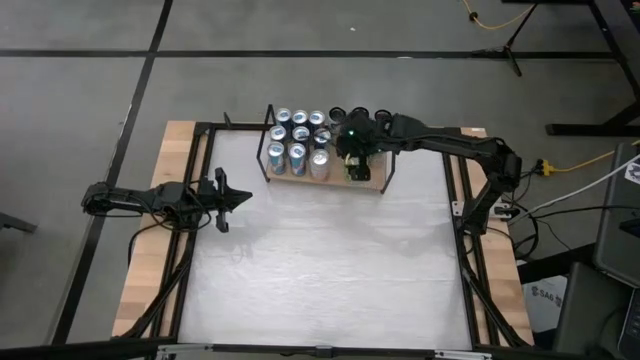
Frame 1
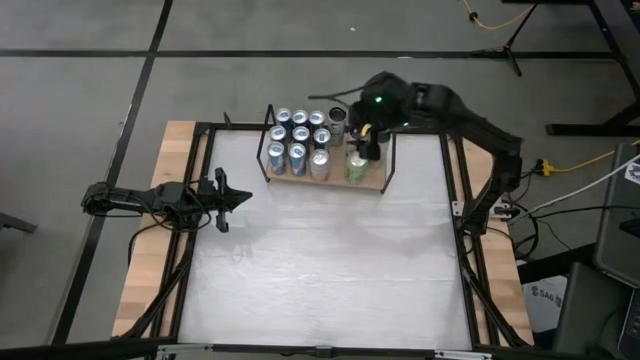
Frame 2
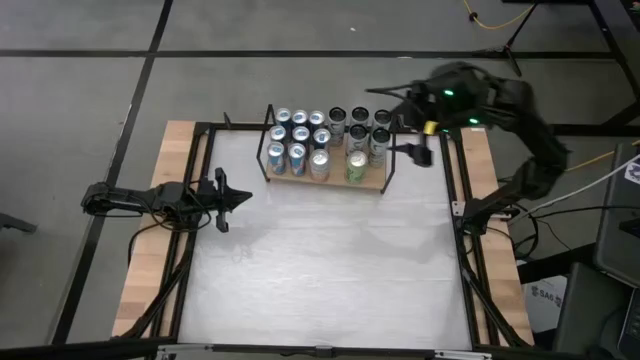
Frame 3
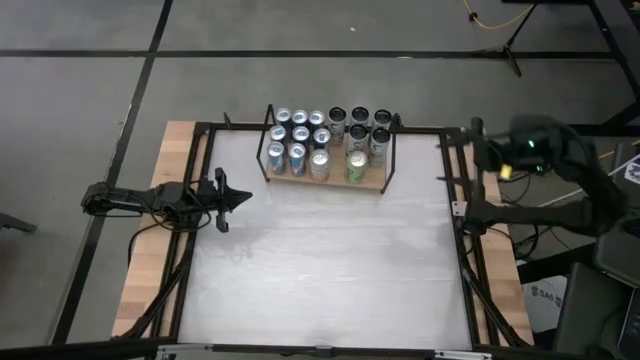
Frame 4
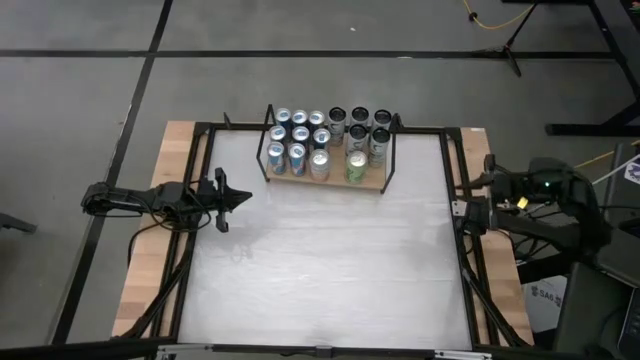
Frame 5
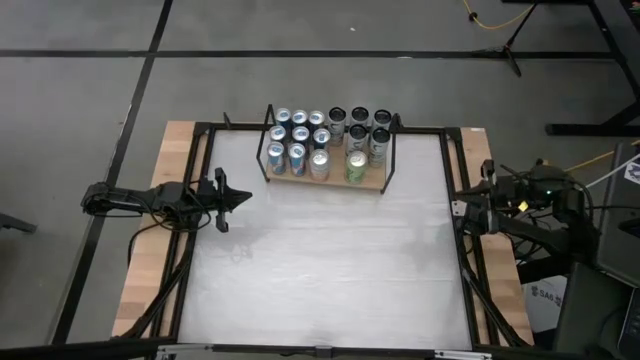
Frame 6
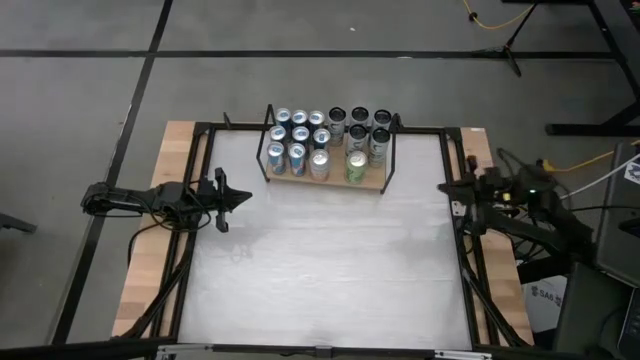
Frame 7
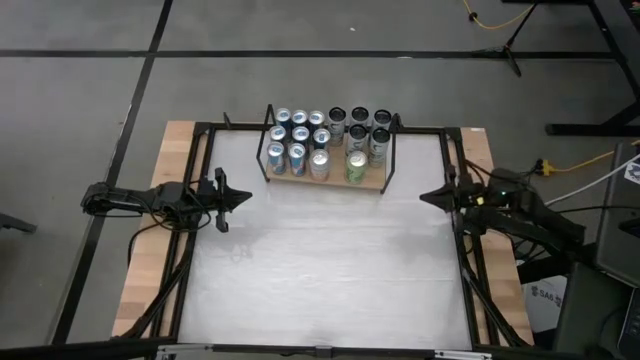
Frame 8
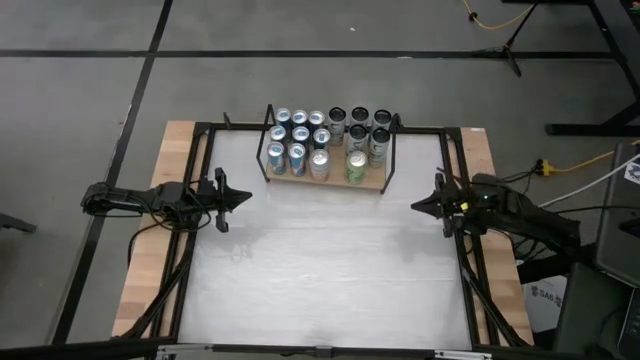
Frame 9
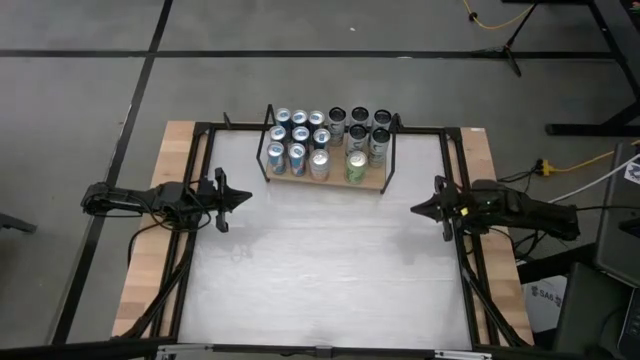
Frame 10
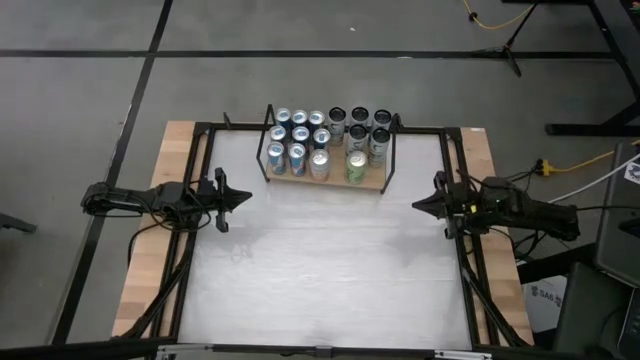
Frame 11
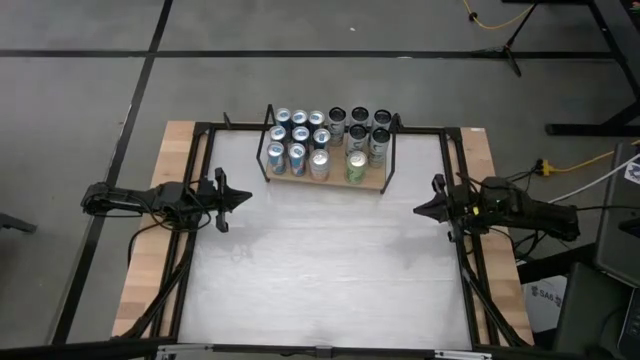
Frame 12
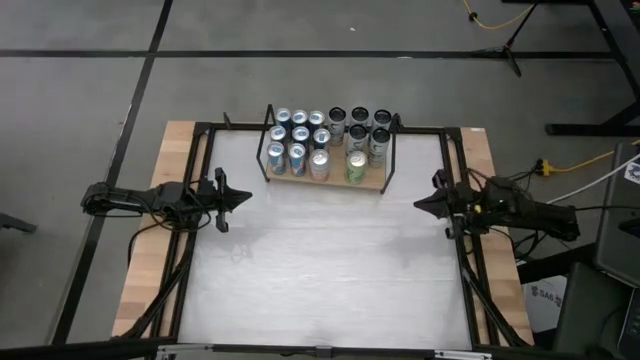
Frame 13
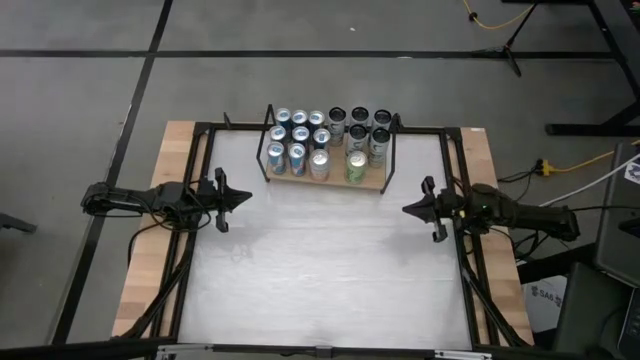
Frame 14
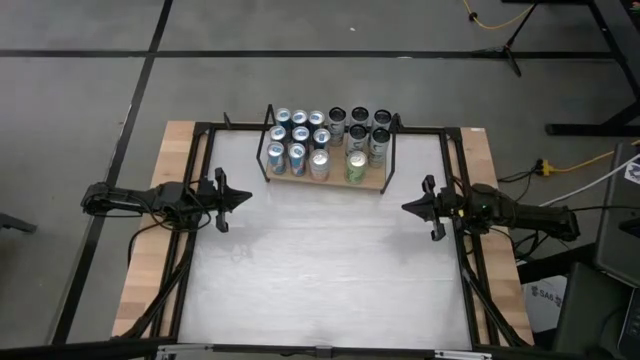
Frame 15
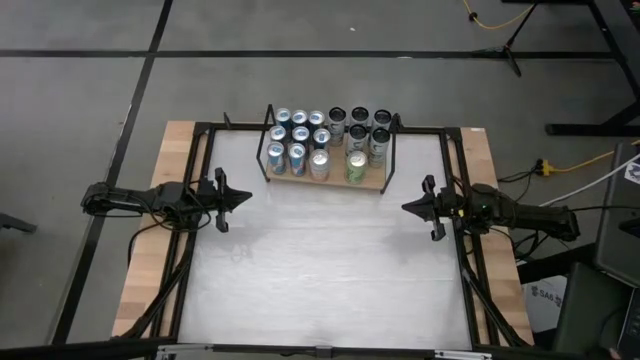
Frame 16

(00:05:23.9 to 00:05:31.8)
Task: Place canned beverage on shelf
Return to Home Position

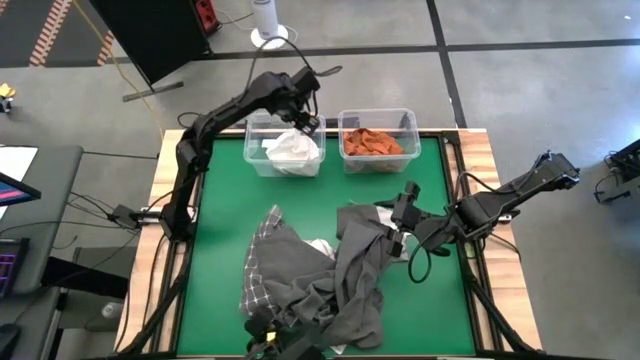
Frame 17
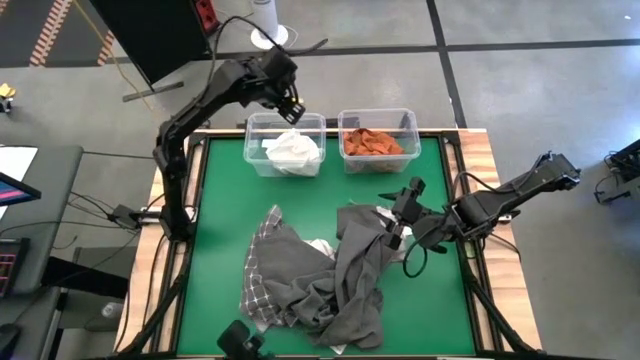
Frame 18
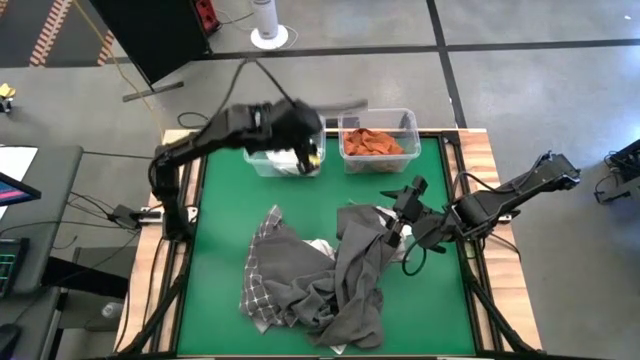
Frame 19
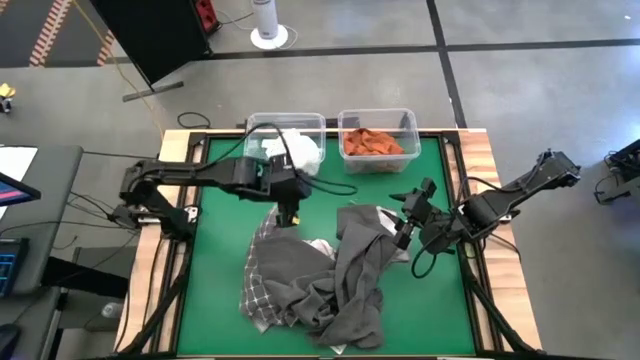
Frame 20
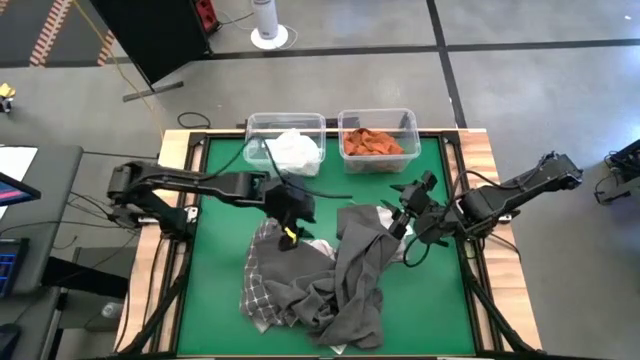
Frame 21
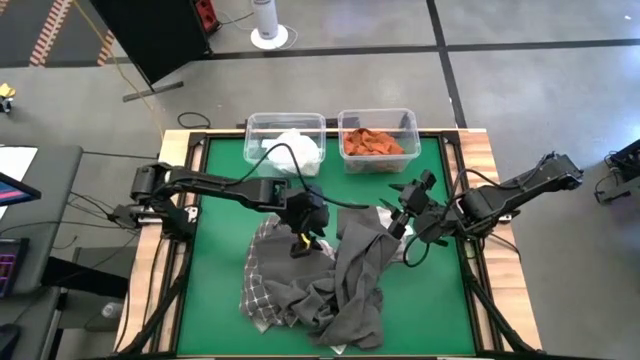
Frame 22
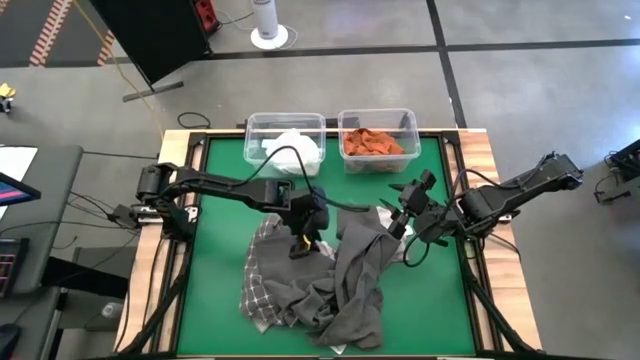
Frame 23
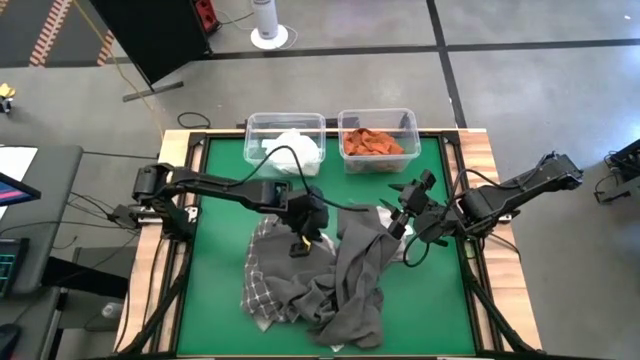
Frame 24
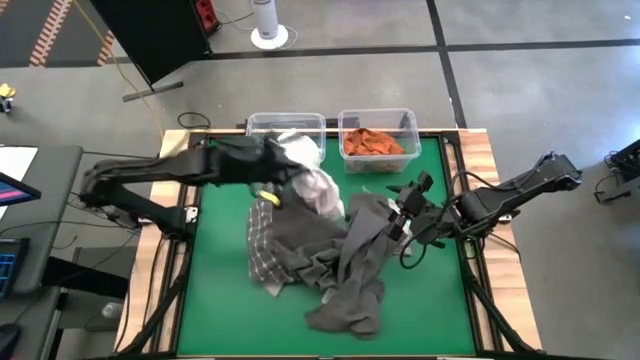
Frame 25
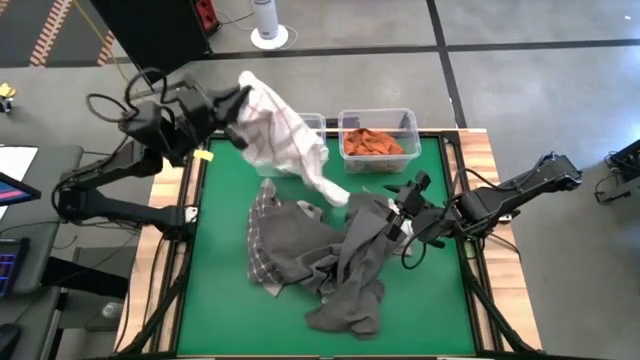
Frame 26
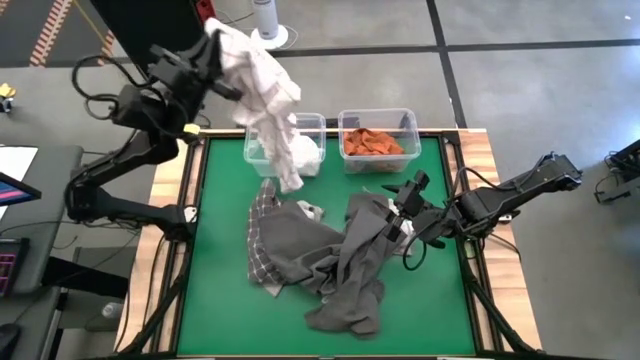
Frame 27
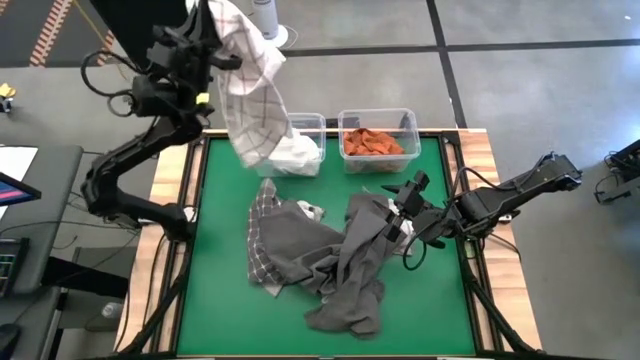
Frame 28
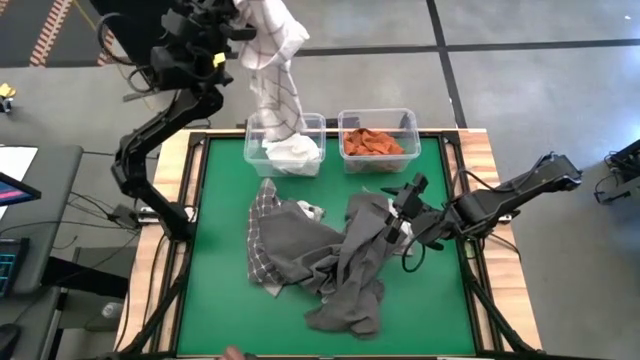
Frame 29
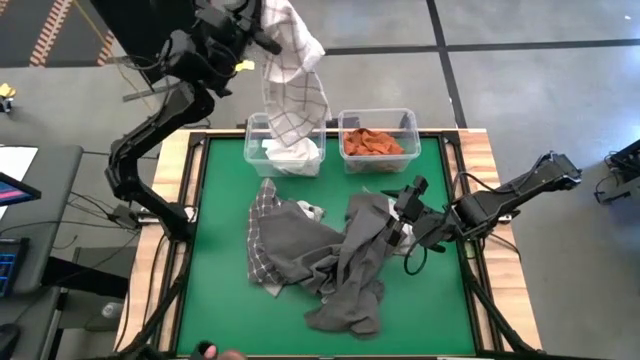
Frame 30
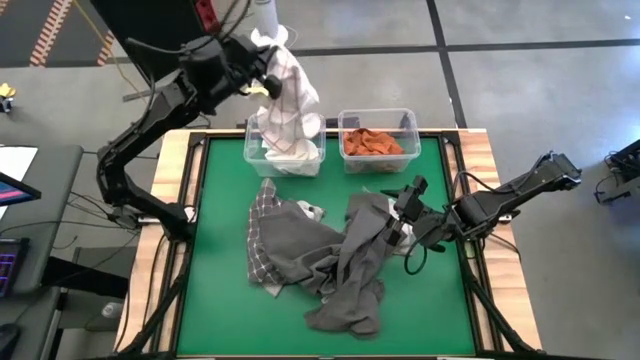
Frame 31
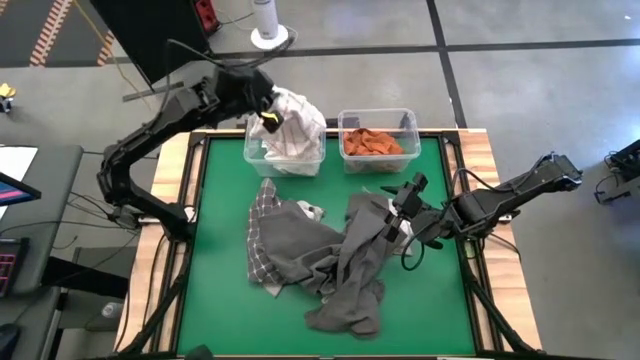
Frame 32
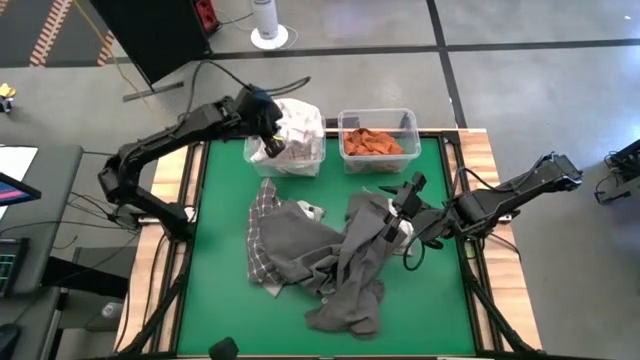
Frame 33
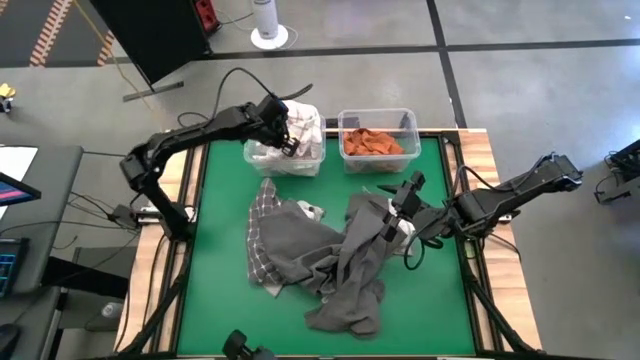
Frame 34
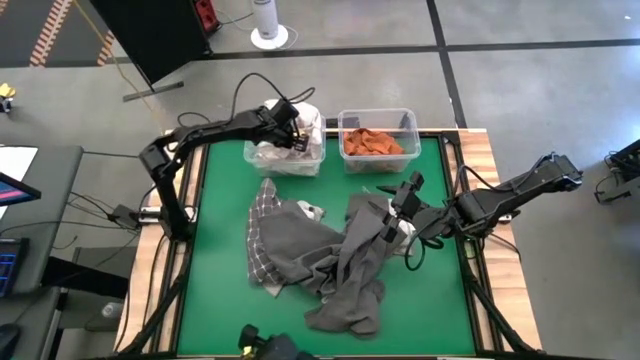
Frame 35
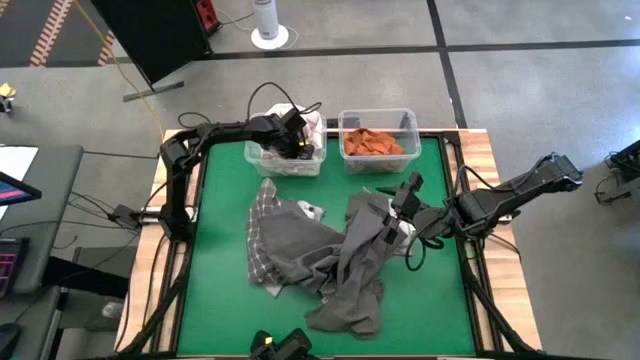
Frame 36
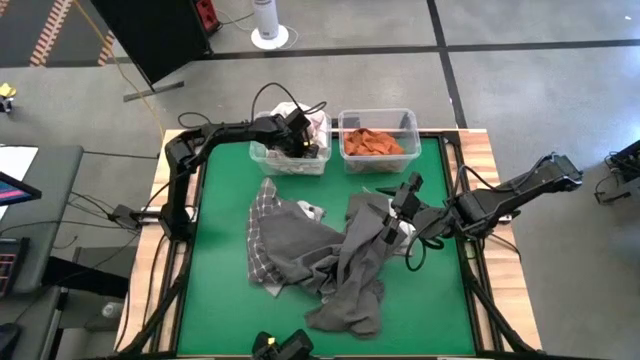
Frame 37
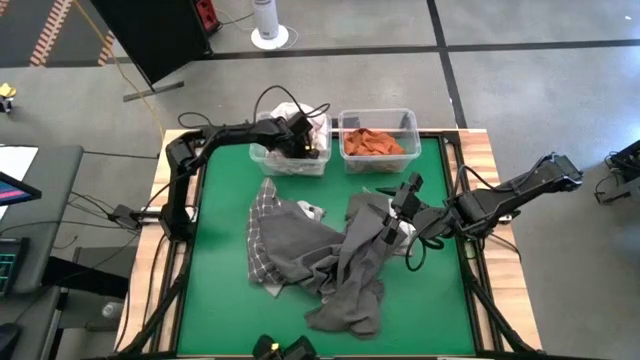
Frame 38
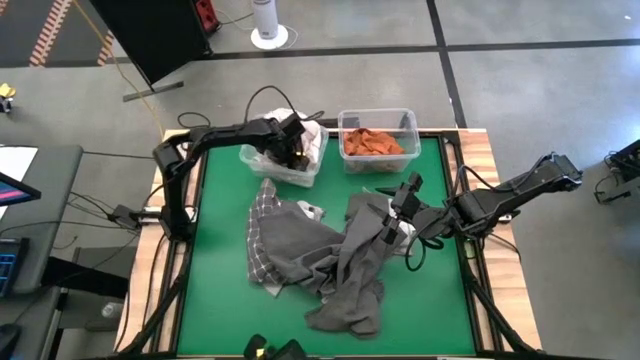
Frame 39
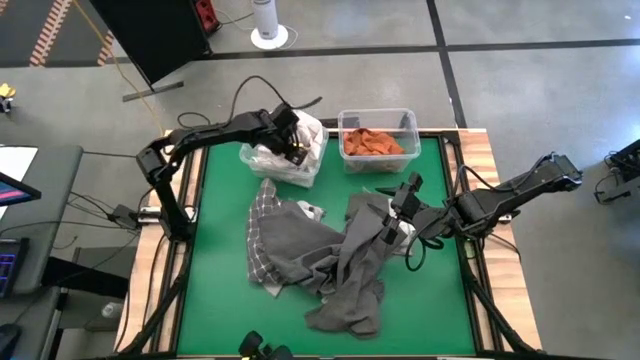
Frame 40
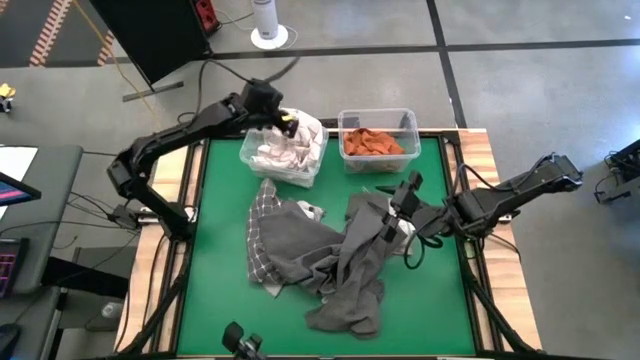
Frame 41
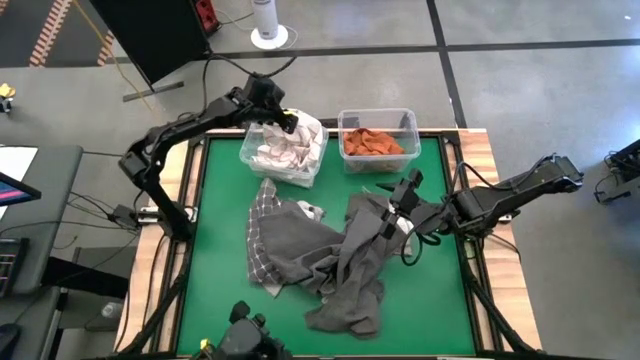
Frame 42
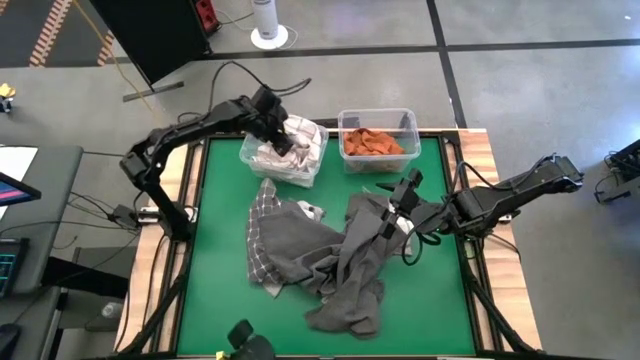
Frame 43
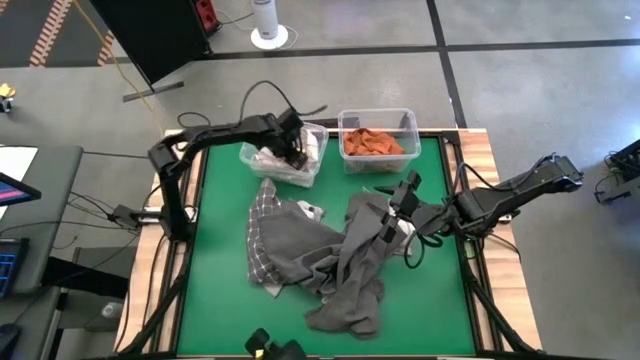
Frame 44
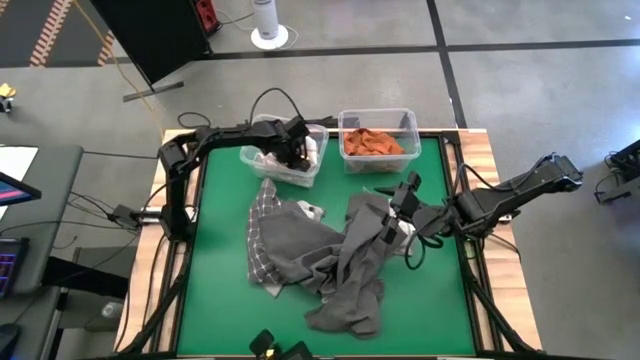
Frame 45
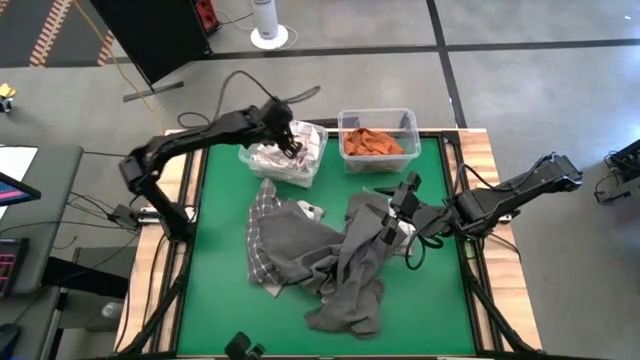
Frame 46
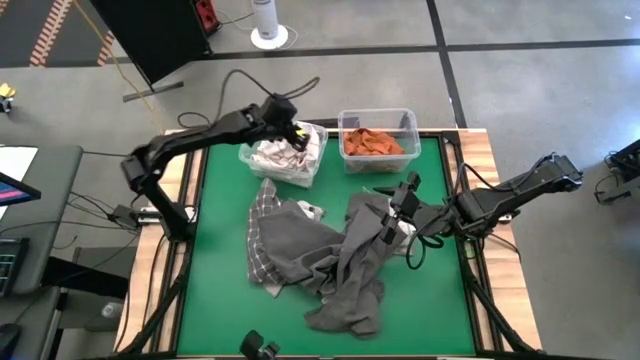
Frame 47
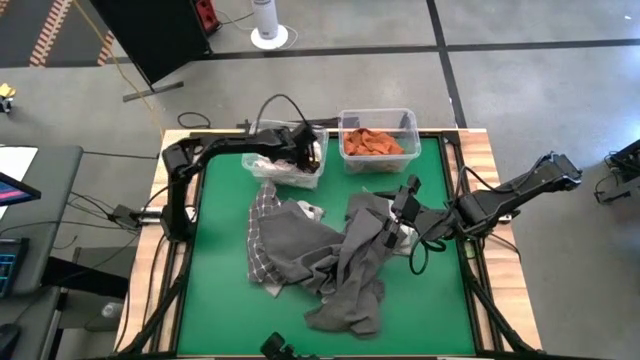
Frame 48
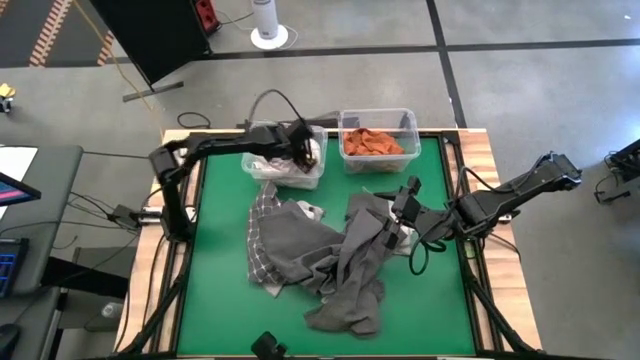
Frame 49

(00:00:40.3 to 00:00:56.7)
Task: Sort towels by color in basket
Put the white striped microfiber towel into the left transparent bin
